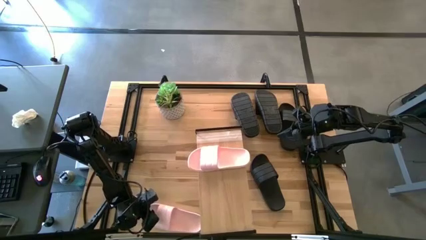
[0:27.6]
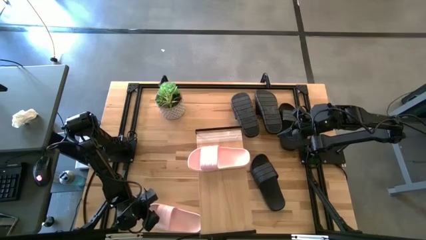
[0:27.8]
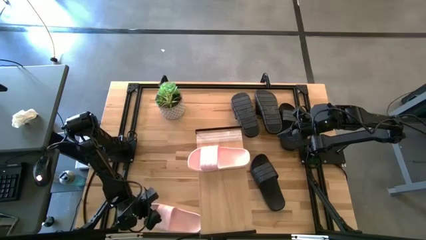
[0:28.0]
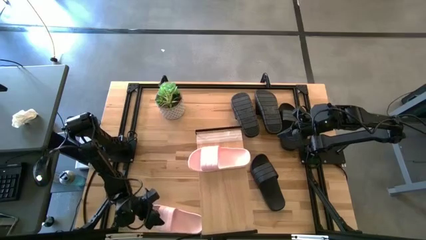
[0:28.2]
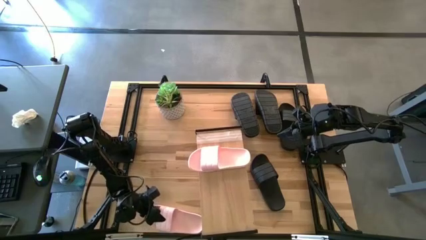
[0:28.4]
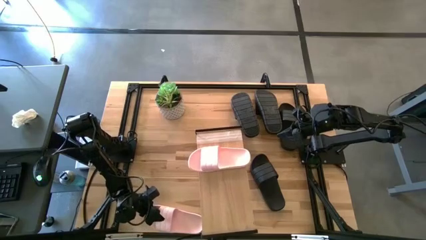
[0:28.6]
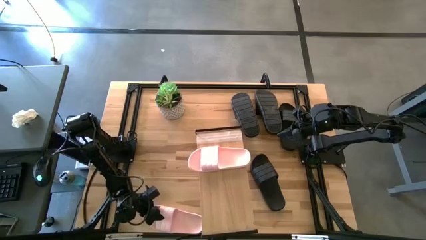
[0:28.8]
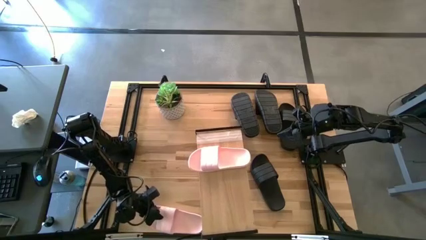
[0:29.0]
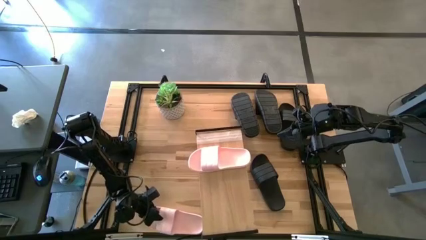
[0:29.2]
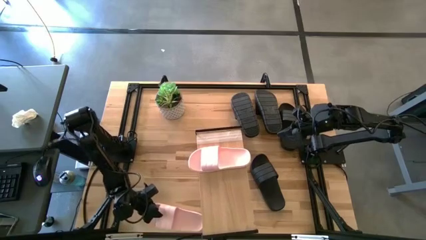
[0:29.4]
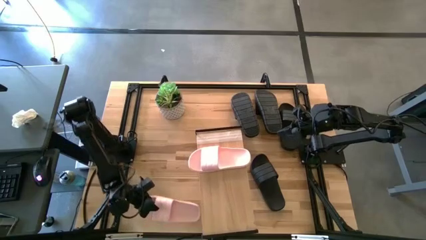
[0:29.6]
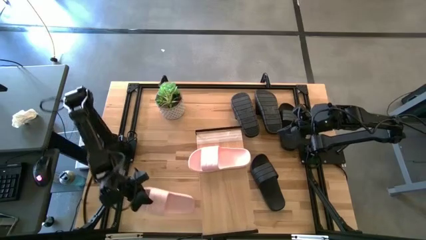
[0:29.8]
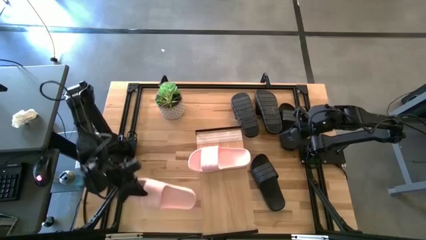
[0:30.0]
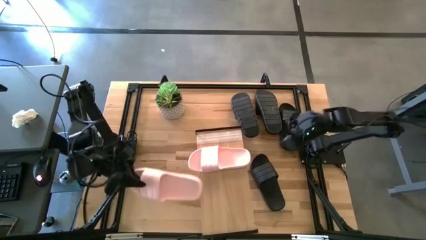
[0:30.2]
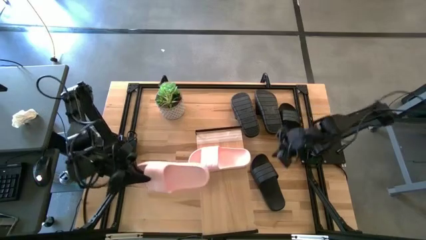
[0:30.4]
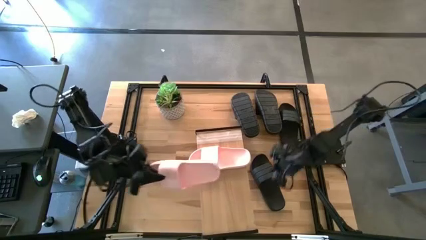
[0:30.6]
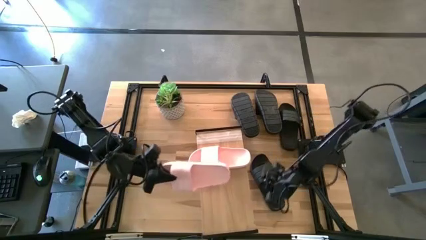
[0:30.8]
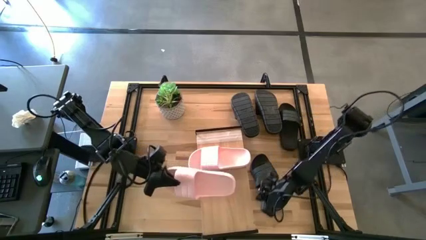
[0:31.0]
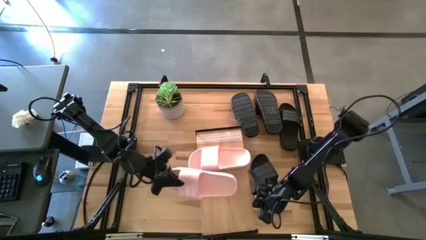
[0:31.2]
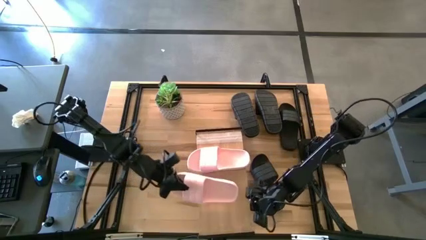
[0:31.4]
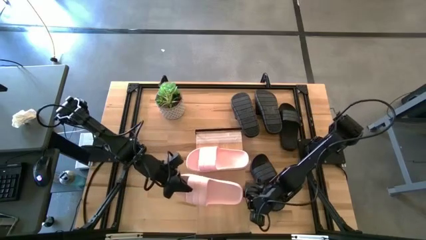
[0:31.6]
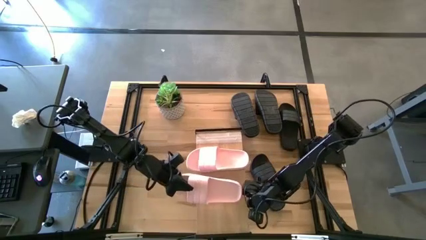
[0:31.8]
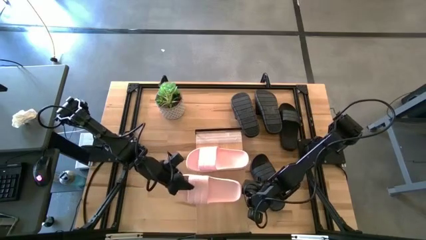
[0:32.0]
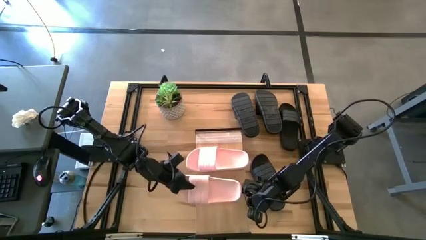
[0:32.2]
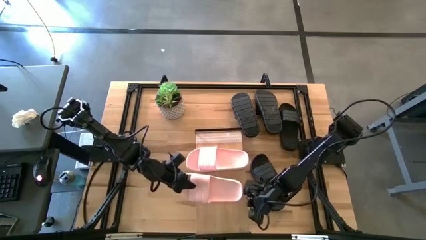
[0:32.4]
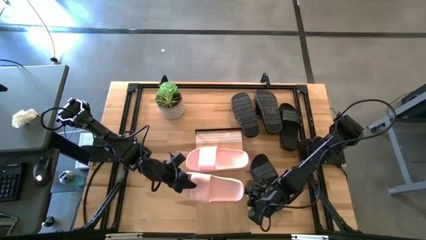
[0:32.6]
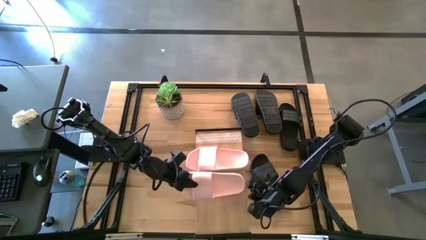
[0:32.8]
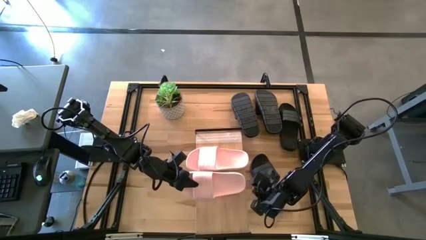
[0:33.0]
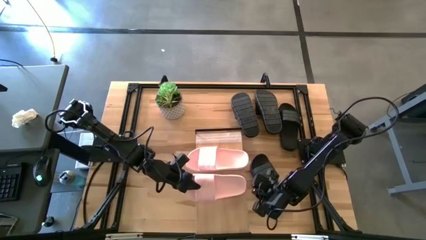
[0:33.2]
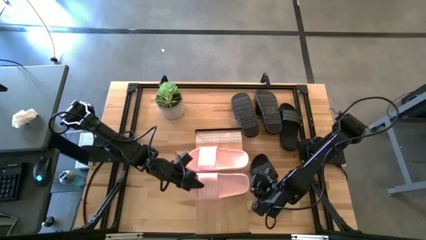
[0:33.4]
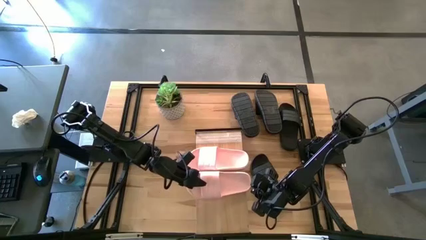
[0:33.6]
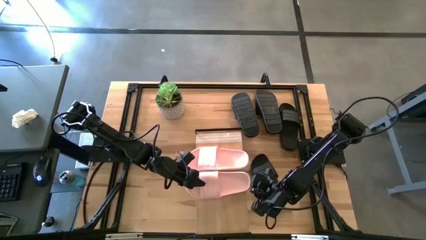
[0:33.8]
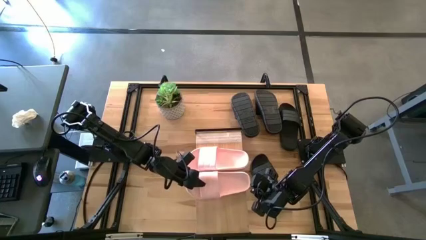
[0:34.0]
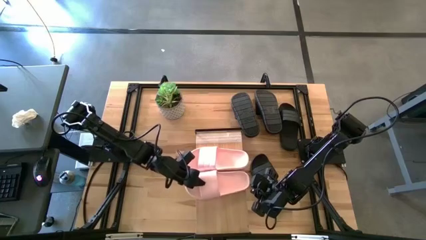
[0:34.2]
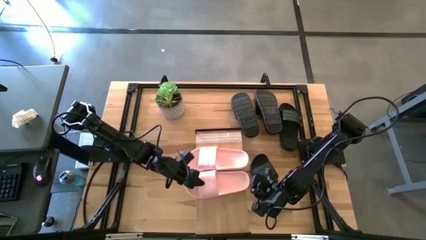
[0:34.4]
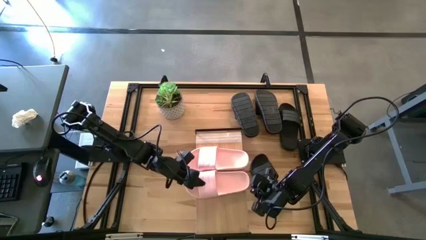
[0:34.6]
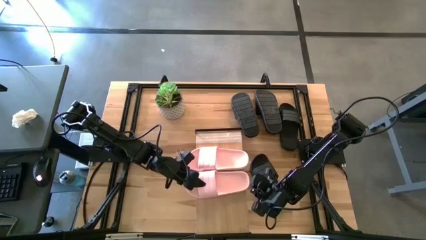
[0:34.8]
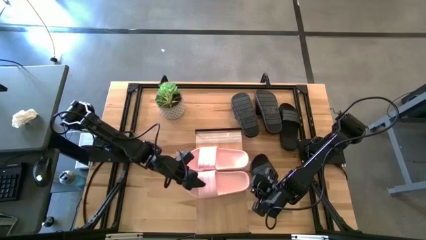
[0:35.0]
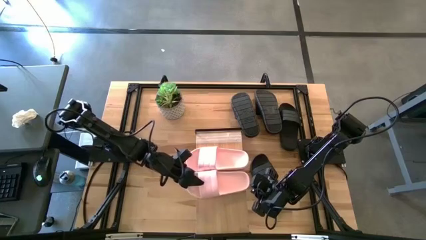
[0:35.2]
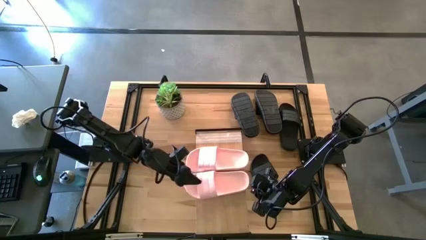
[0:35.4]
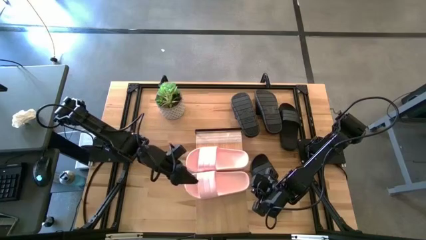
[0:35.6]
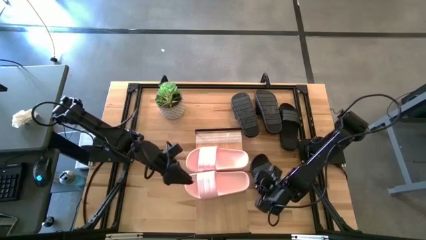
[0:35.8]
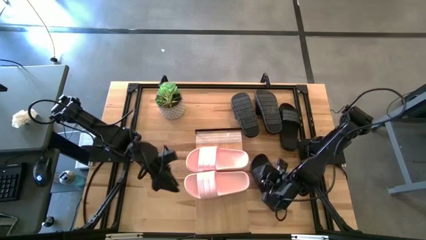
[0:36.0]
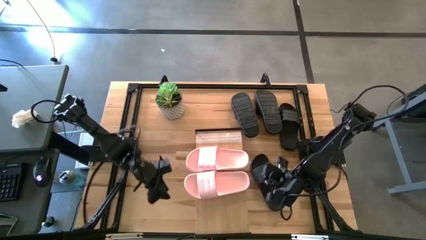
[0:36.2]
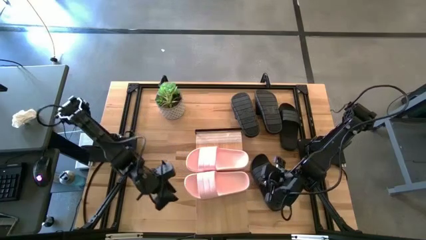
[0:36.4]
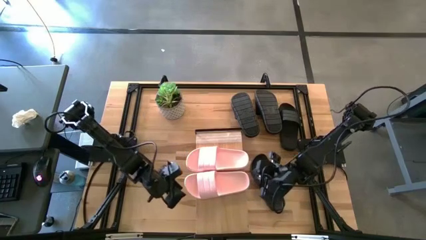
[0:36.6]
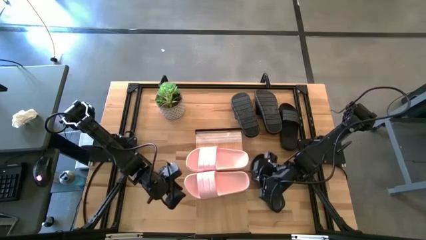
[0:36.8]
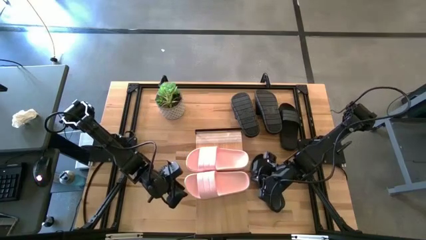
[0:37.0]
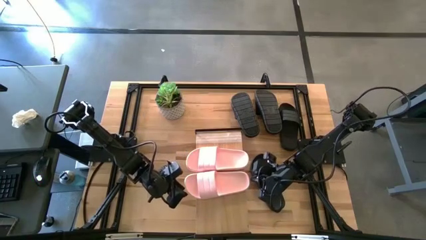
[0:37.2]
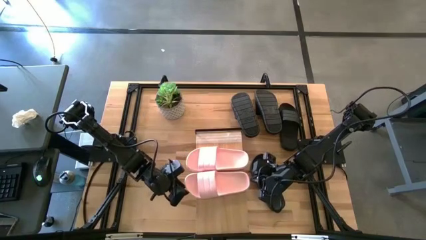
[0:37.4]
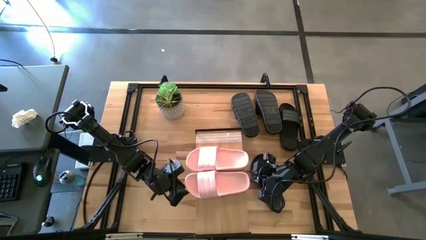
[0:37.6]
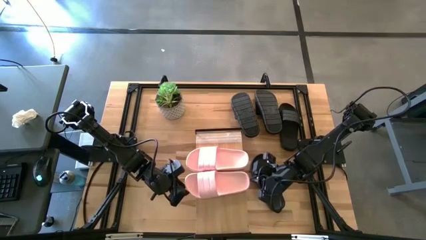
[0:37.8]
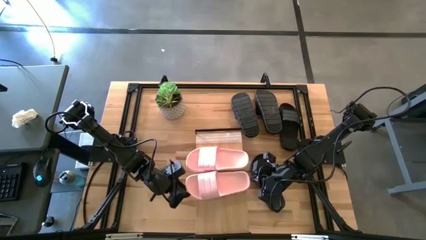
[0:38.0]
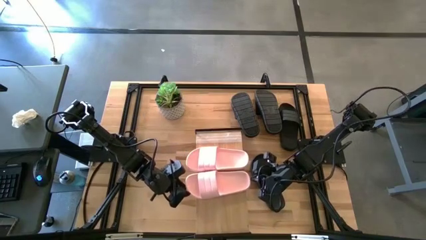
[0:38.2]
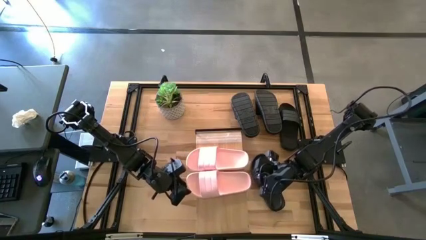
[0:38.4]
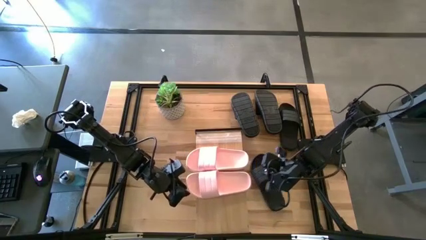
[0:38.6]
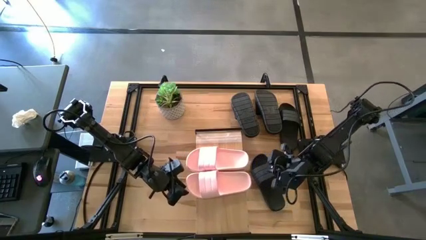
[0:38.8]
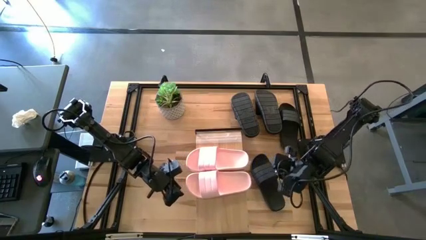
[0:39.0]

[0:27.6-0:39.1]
Task: Pick and place slides into the shelf
Put the pink slipper on the shelf

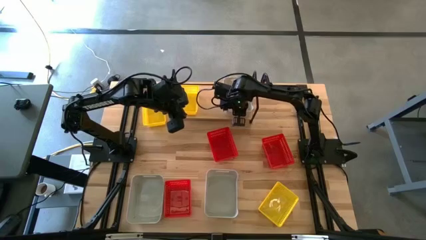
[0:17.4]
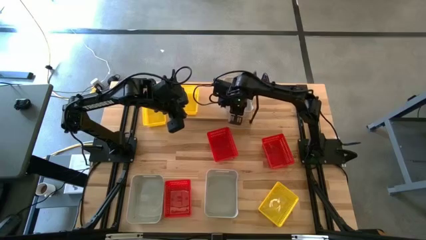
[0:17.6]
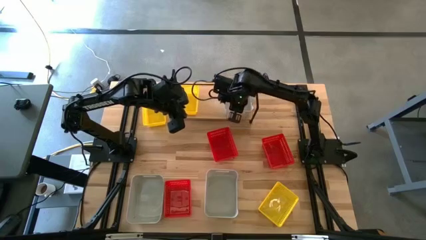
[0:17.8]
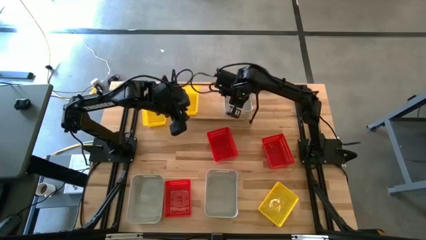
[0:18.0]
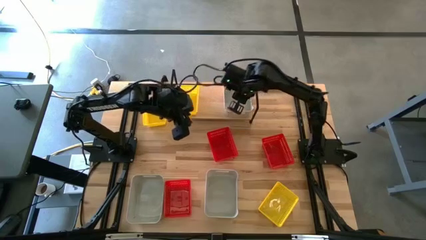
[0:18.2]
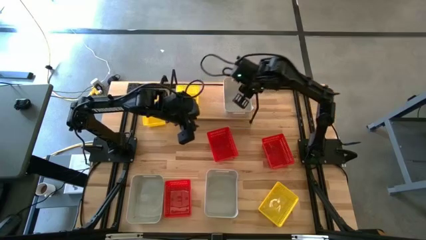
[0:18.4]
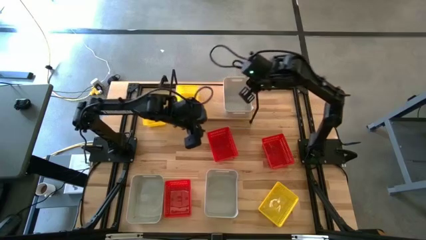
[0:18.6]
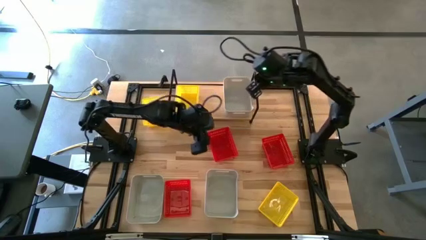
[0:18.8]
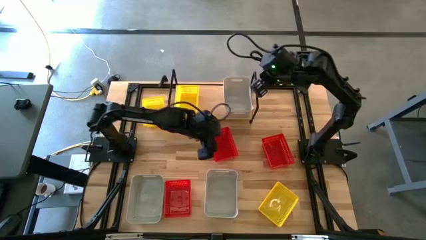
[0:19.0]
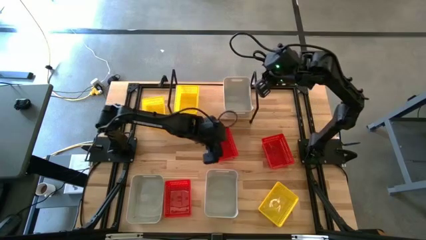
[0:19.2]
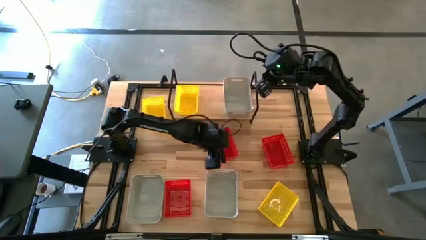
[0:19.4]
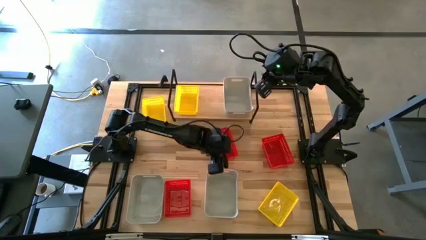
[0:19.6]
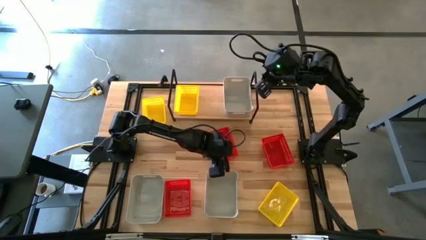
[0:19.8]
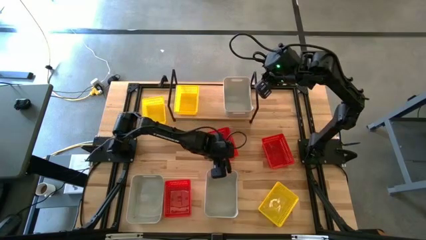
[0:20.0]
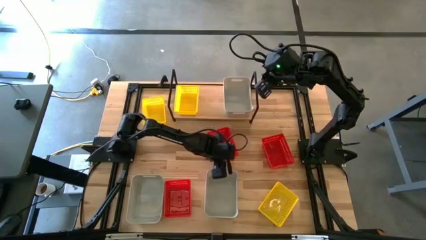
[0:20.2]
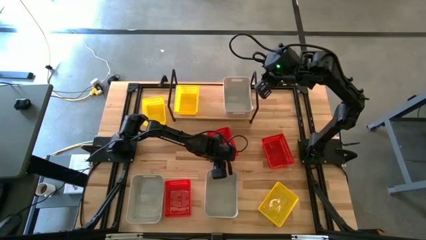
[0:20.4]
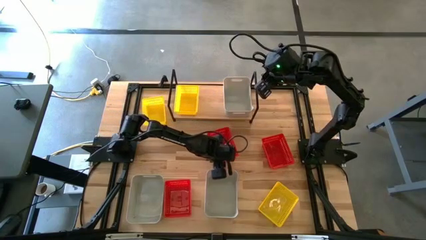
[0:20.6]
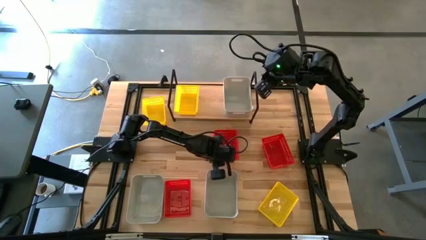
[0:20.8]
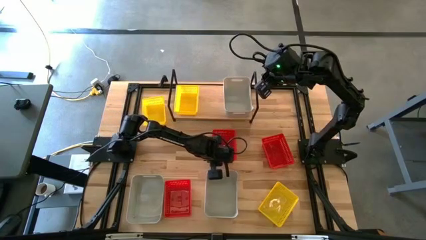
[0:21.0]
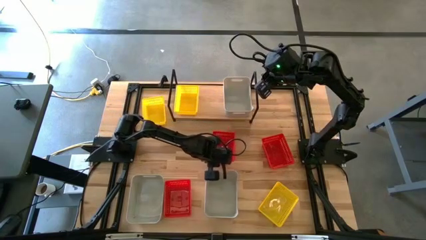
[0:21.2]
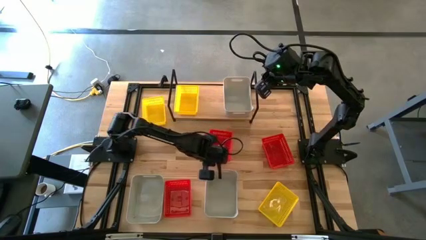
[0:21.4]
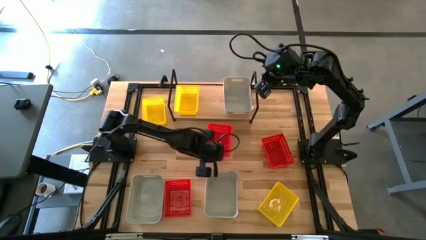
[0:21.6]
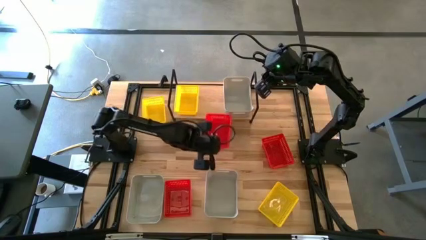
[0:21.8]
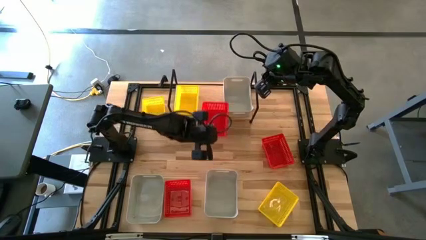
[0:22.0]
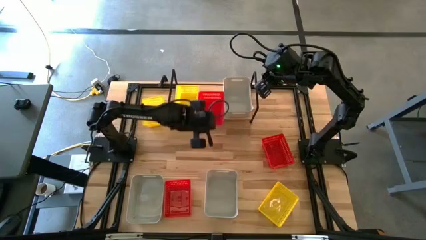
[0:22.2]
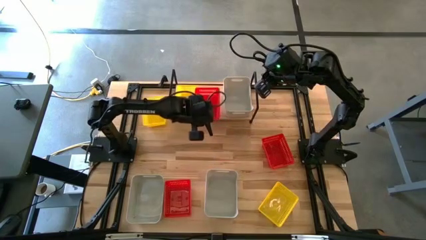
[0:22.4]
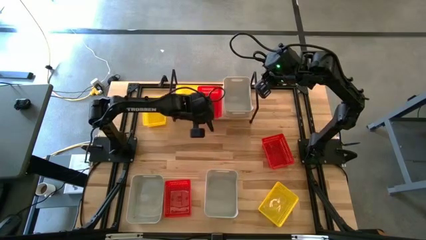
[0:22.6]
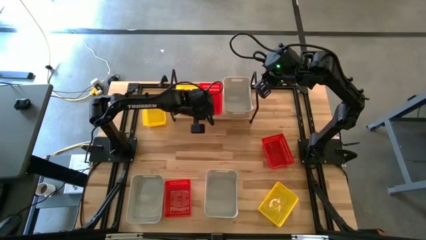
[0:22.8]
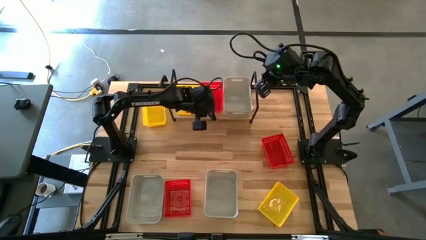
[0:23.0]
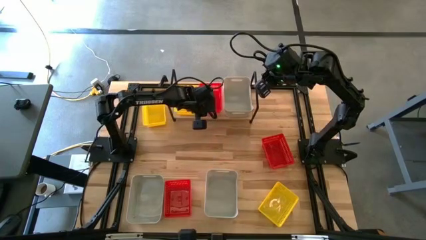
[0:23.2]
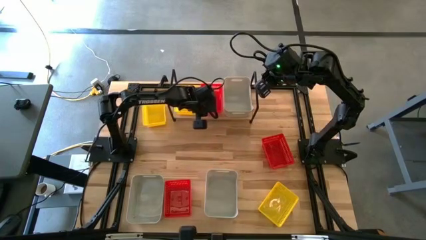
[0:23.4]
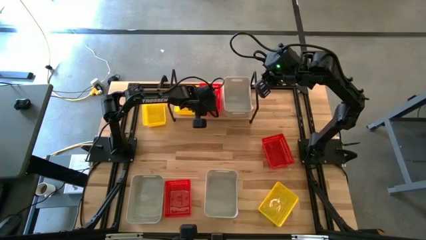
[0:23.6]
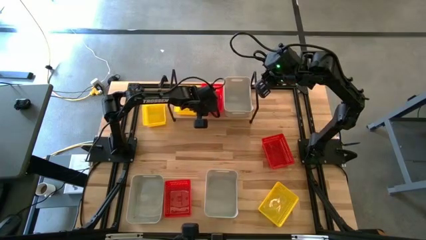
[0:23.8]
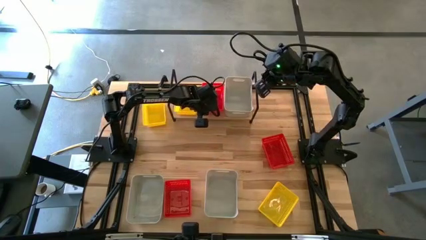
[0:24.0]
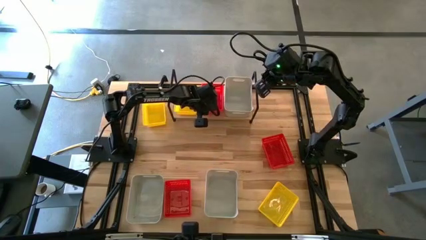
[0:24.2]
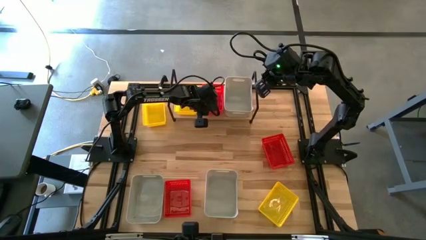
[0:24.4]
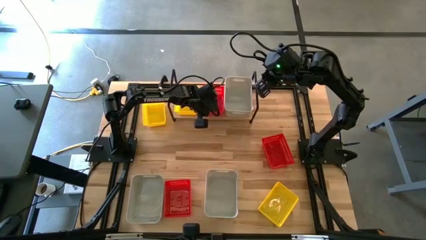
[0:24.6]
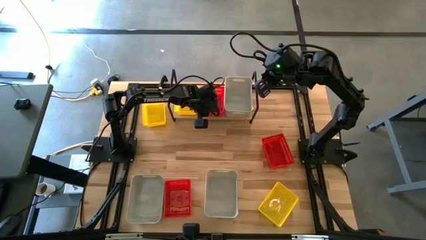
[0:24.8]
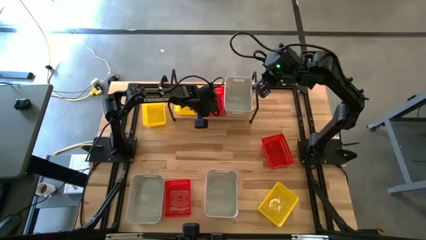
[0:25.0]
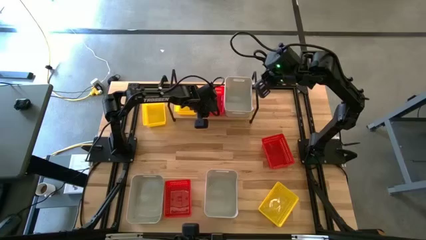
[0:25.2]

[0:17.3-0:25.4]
Task: Stack baskets on shelf by color
Put the top left red basket on the shelf
